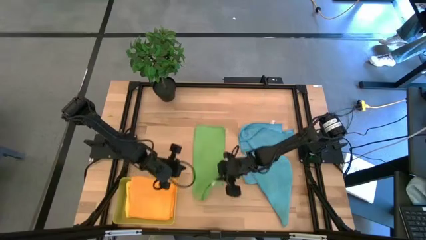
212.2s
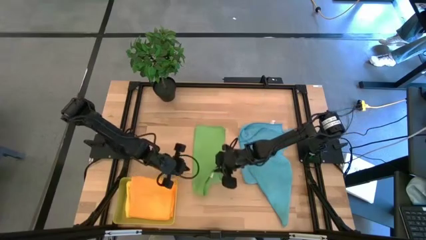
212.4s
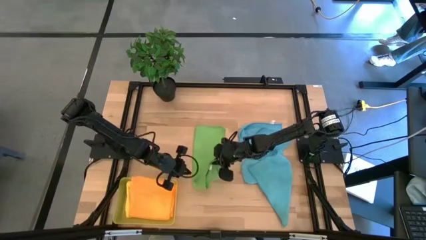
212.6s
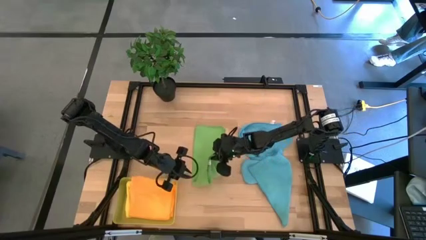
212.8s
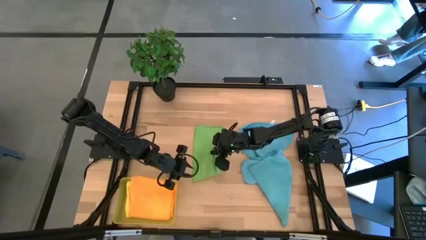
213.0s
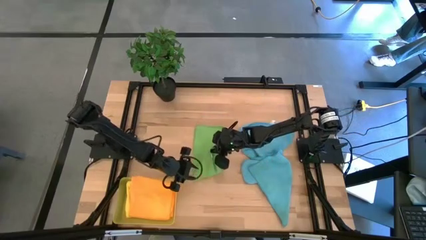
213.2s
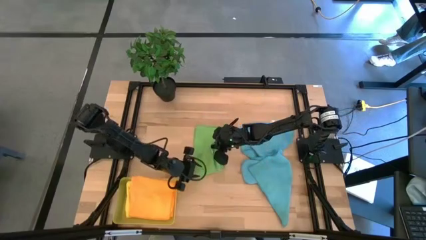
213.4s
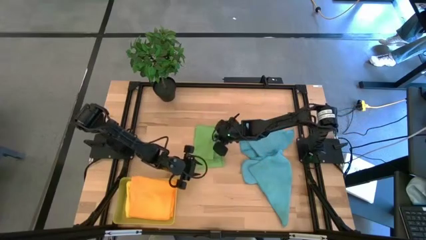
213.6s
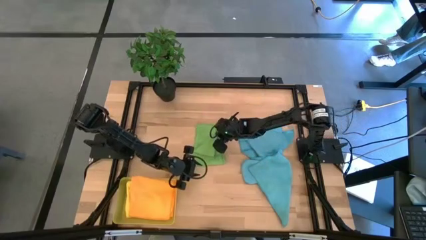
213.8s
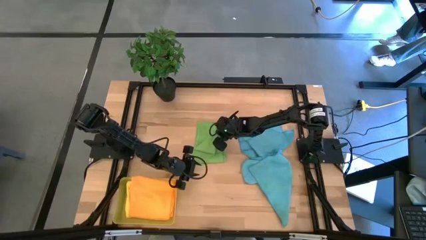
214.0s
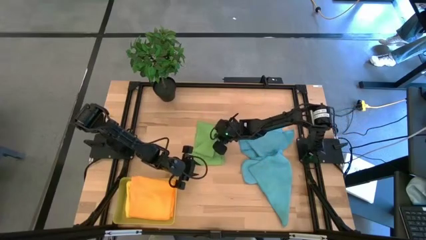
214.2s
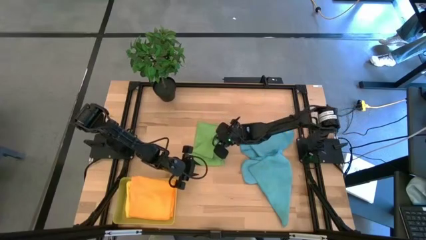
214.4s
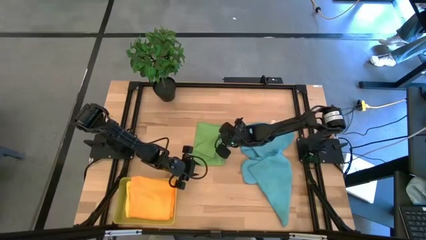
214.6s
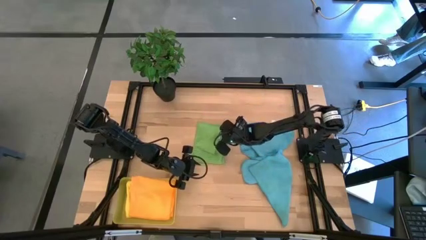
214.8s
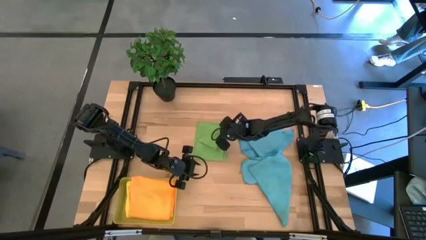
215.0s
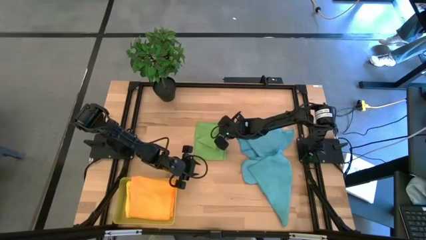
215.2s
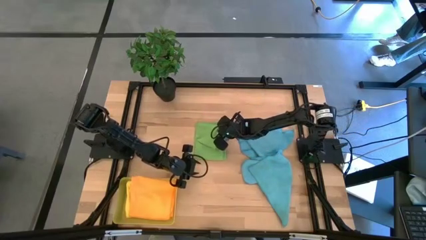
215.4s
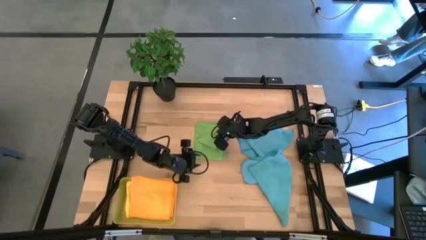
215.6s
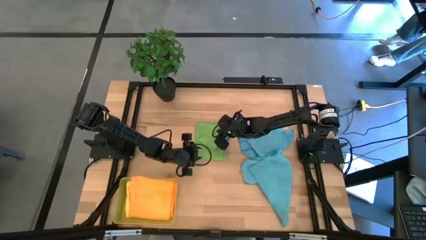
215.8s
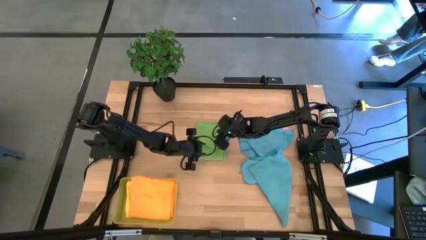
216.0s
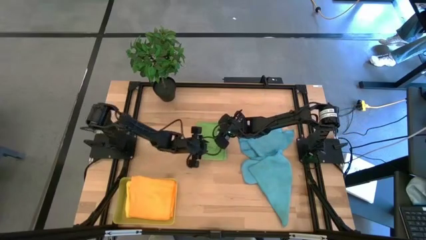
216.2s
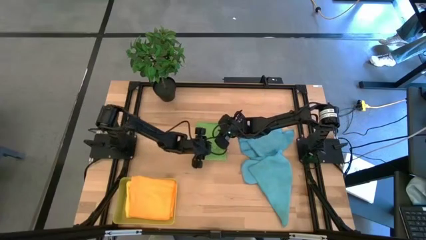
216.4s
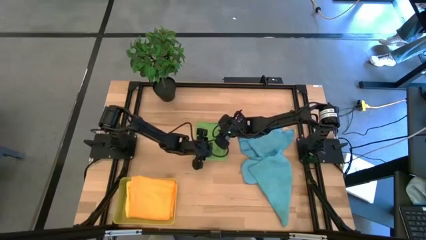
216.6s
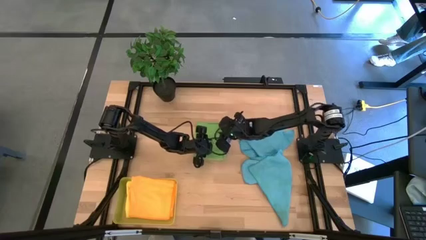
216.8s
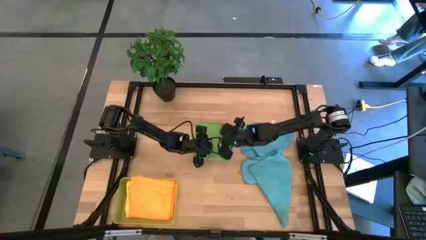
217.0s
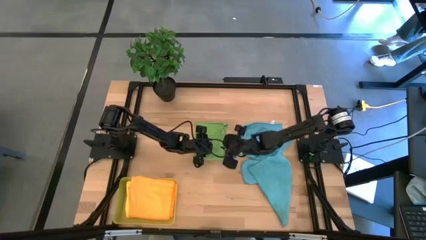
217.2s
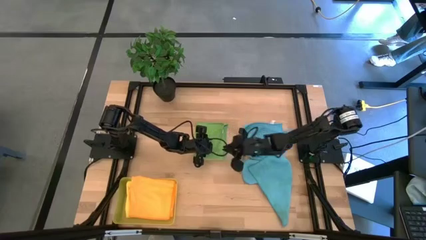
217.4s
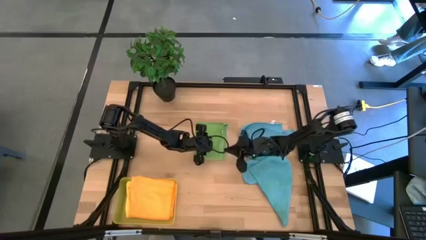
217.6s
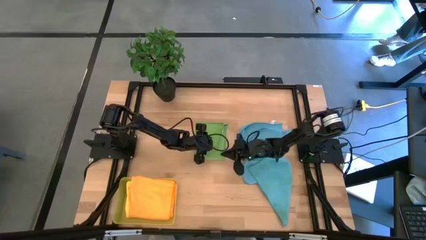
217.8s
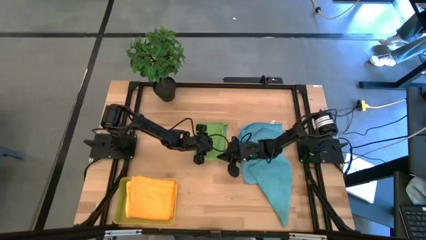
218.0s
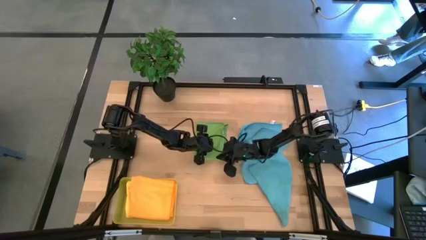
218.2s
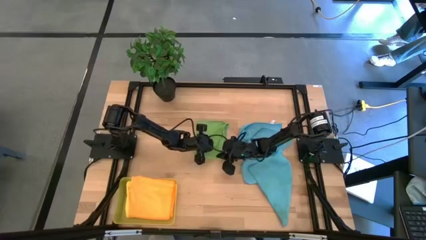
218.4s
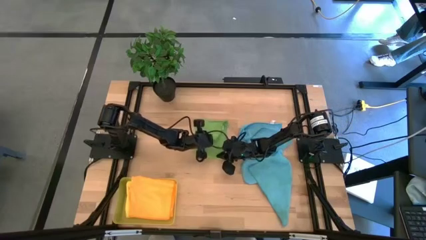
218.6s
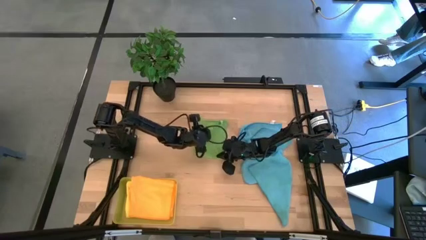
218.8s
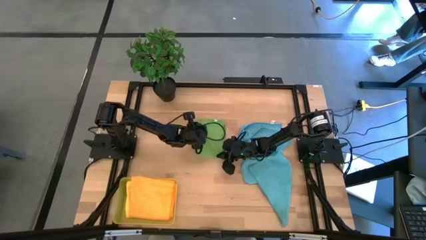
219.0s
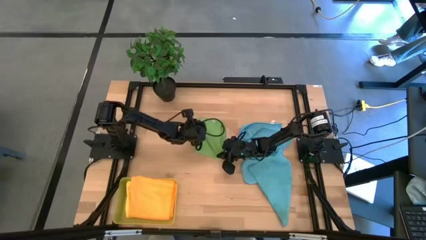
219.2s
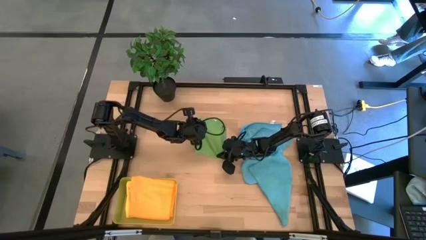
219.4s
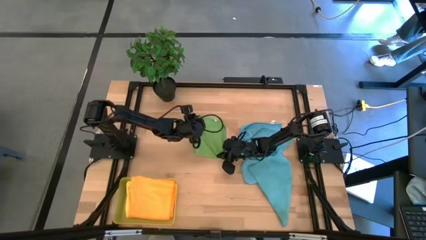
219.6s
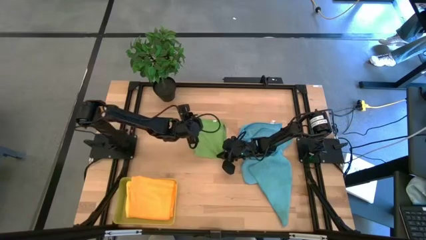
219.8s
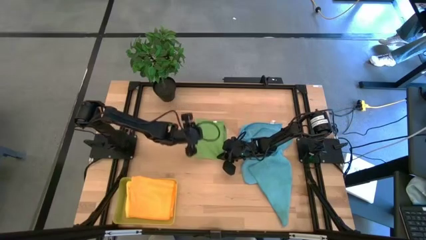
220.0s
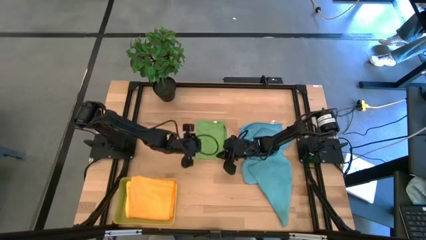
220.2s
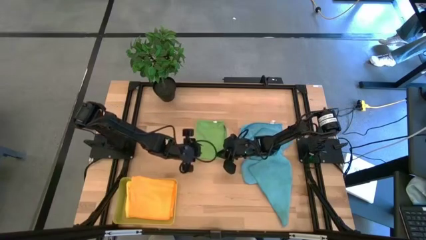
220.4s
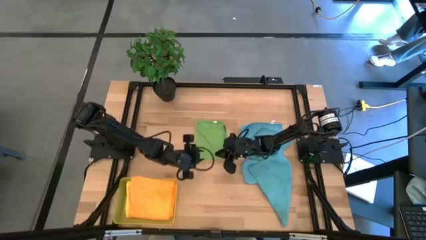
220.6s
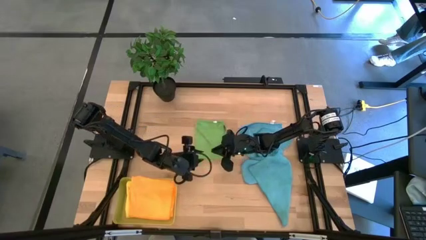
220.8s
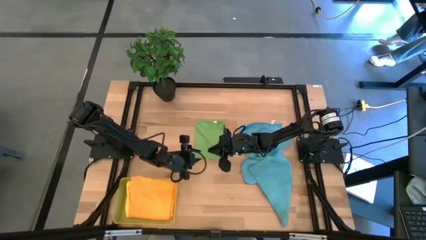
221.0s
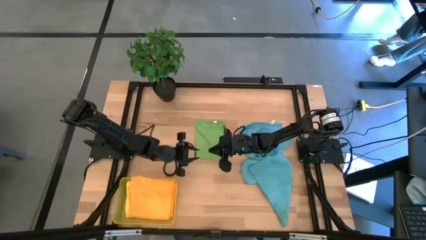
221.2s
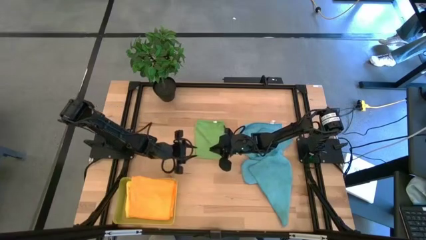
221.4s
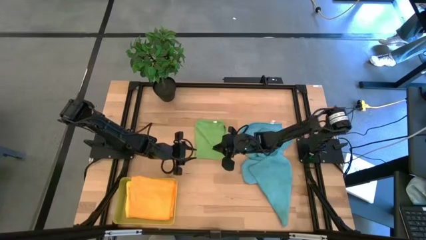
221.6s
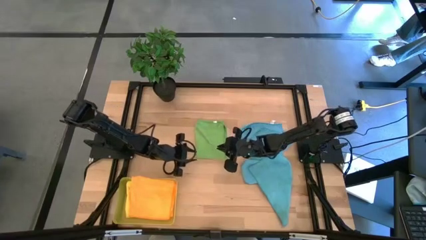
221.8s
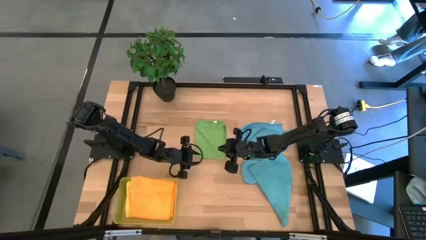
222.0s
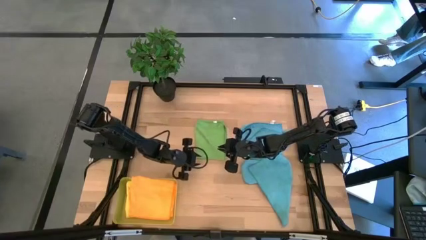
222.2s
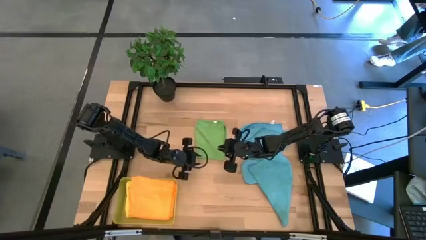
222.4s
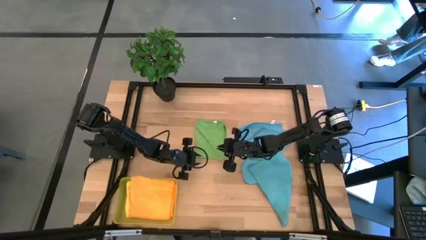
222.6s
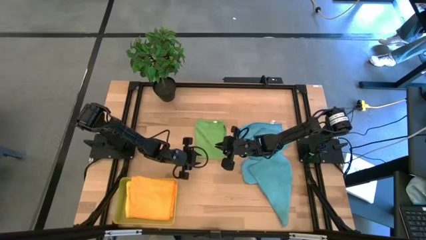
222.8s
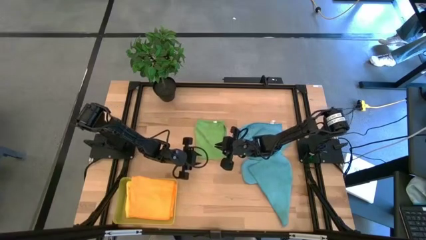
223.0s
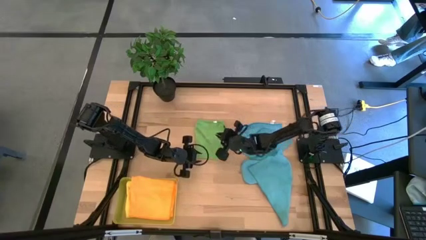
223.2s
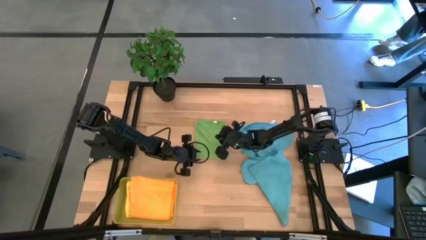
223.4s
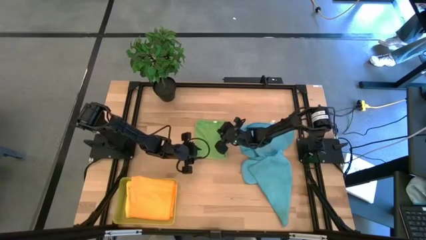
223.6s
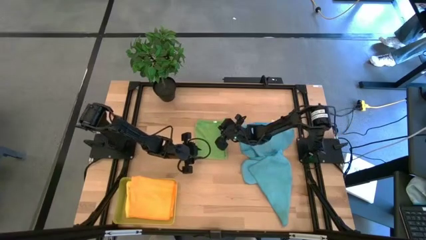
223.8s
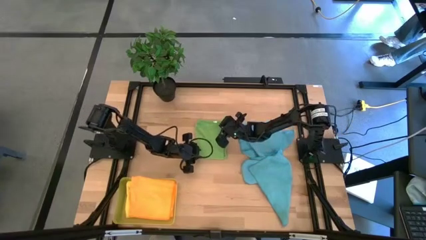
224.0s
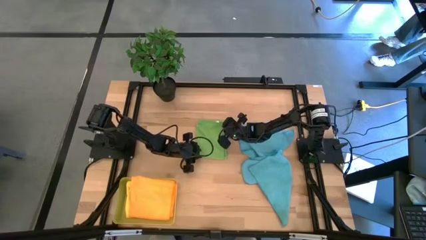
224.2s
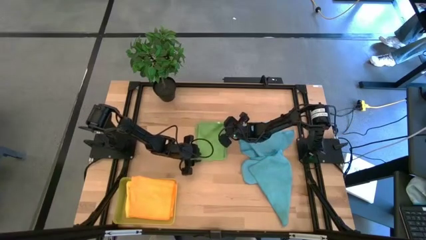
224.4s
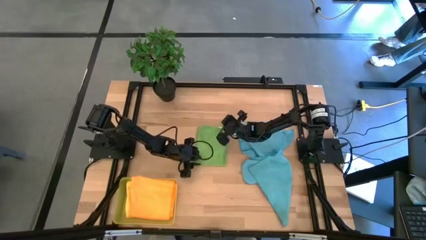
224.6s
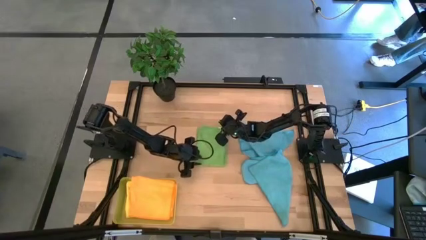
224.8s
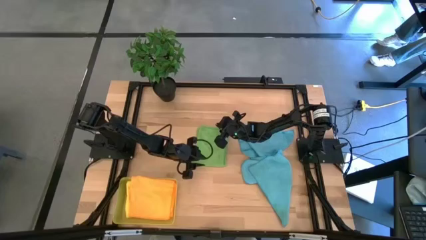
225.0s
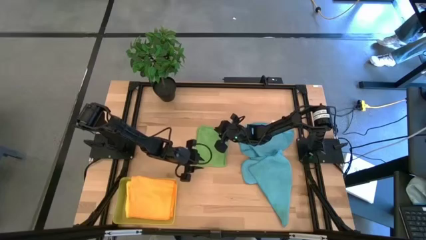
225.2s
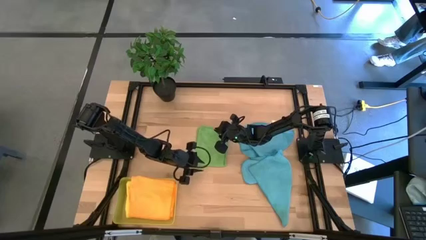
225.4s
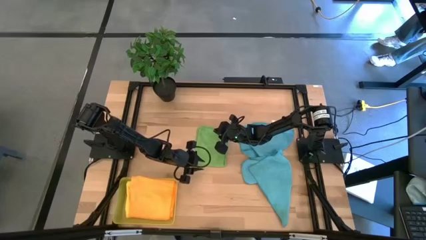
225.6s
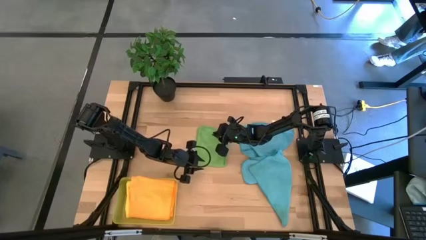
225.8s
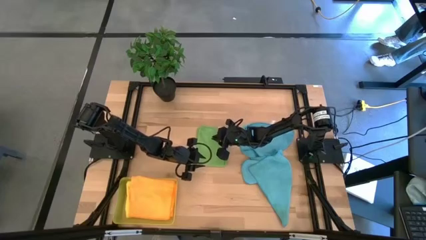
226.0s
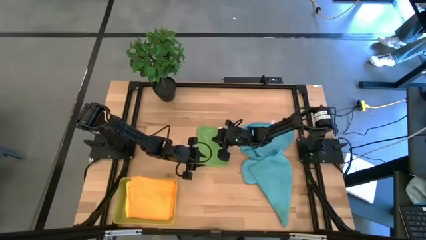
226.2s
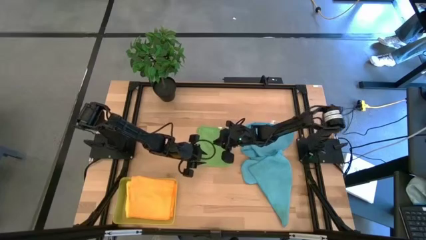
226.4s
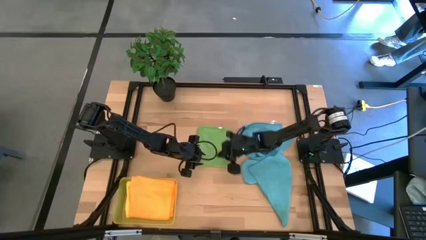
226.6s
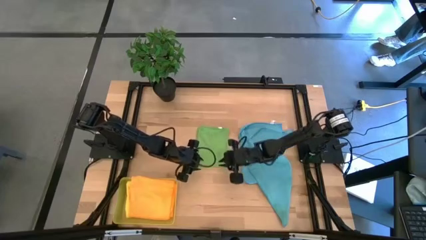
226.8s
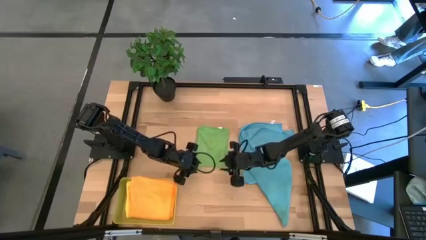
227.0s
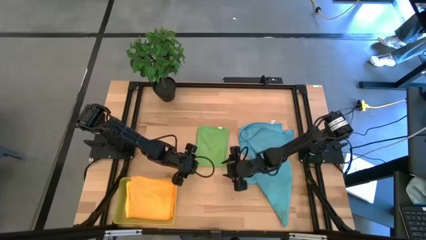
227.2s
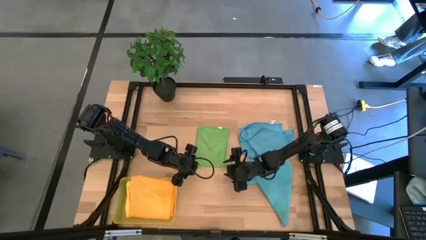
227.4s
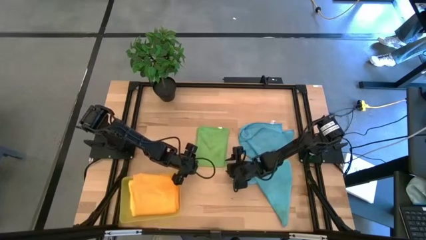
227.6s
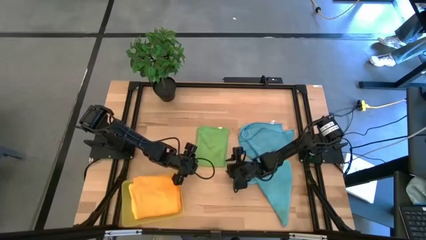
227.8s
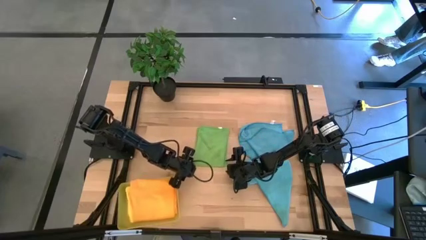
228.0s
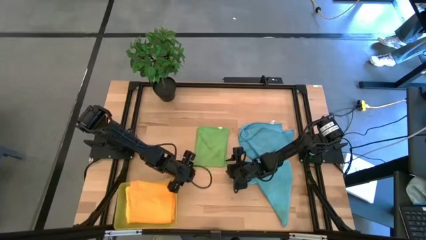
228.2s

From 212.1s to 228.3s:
Task: Fold microfiber towels
Fold the green microfiber cloth
